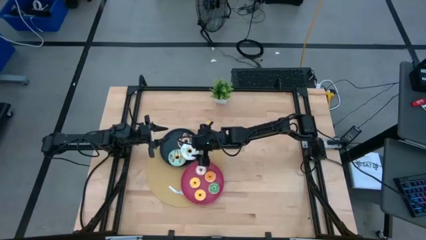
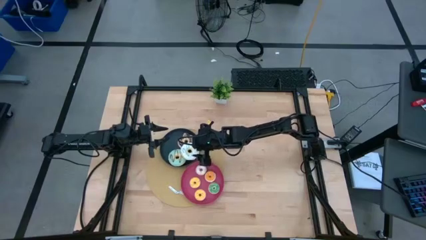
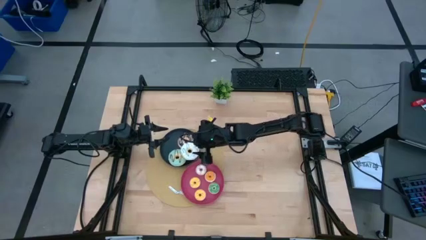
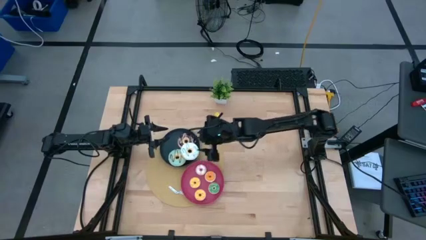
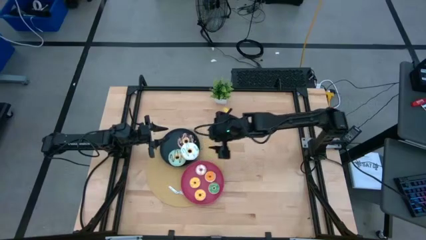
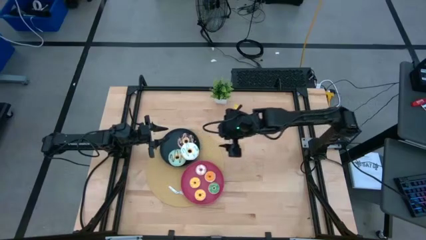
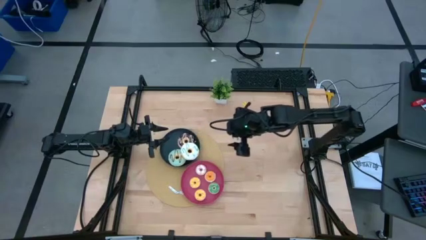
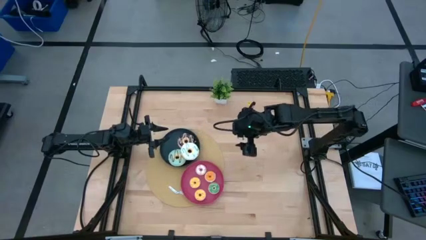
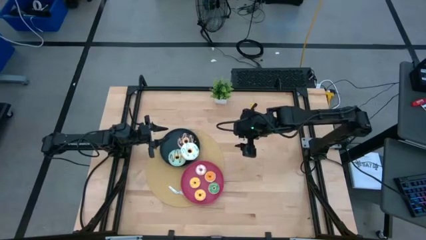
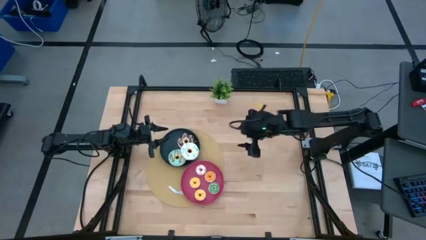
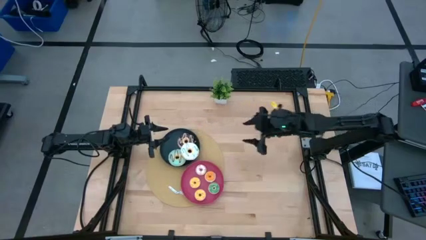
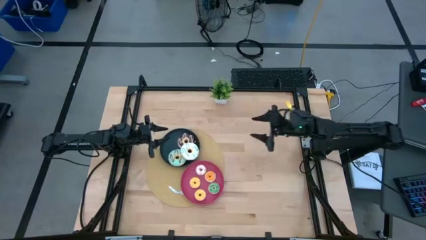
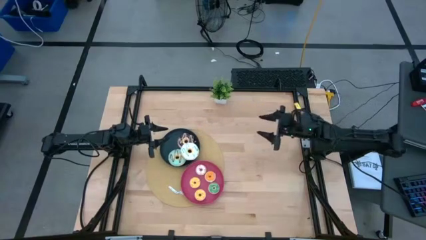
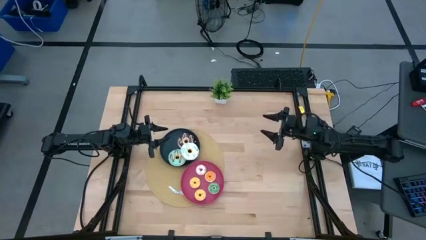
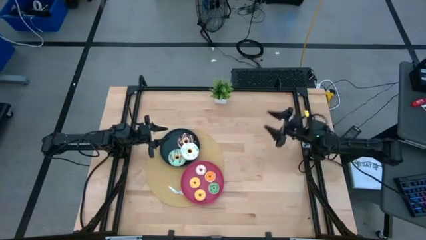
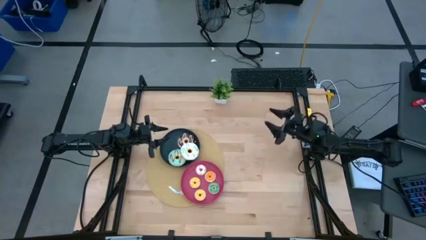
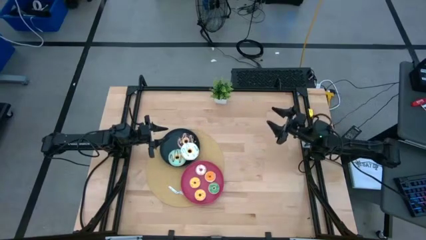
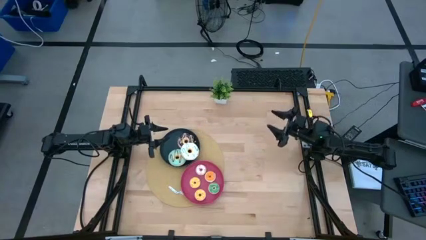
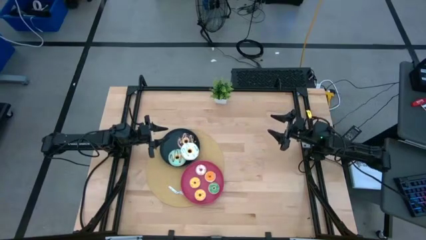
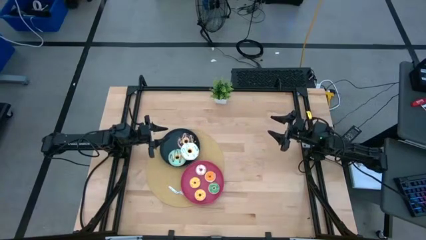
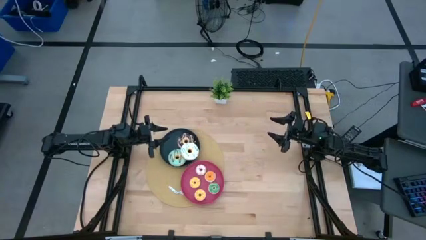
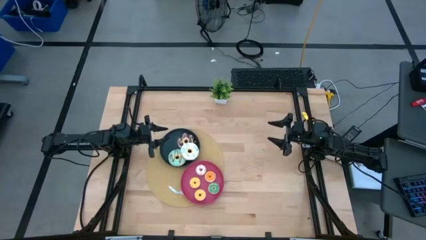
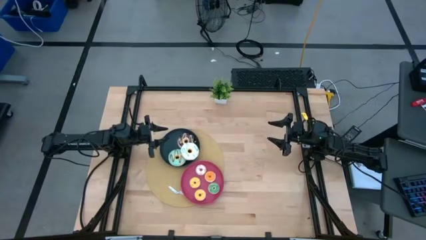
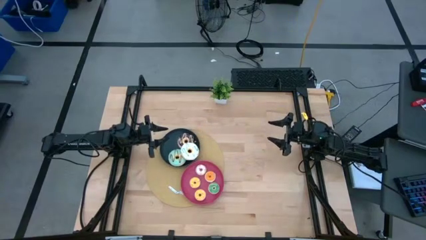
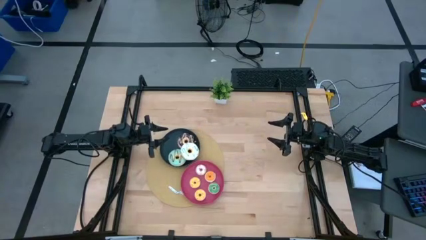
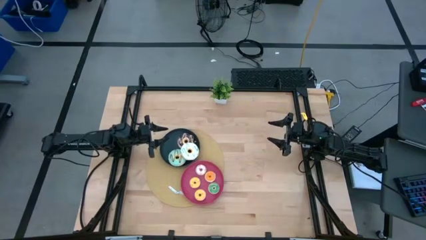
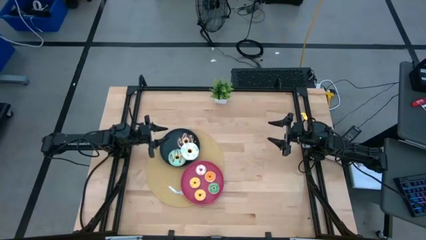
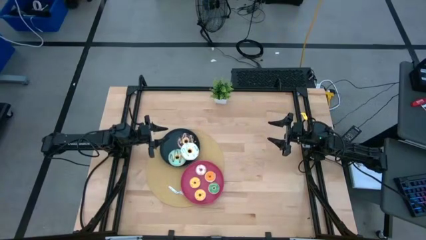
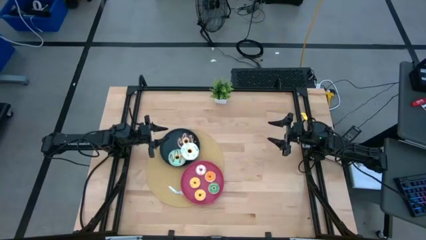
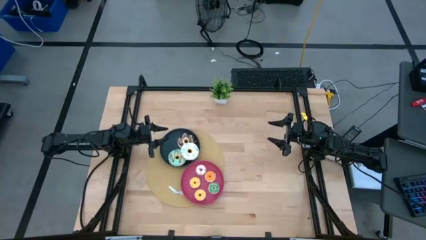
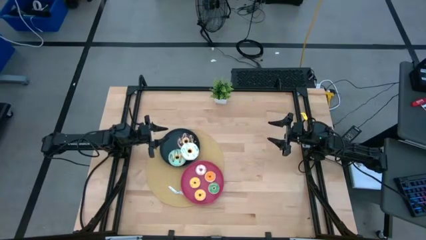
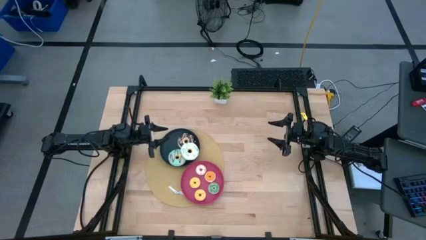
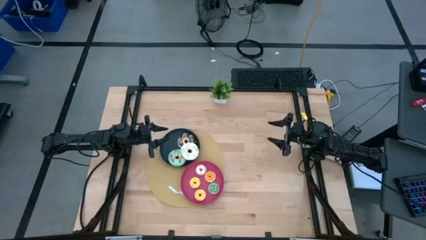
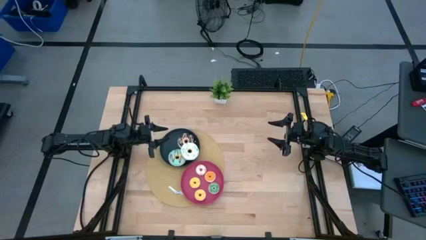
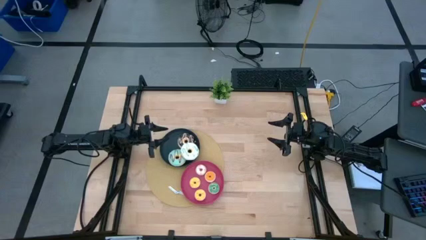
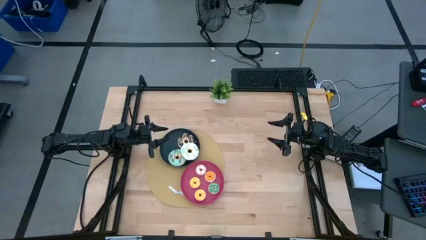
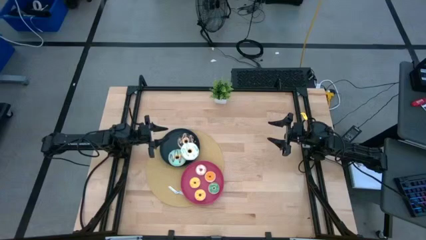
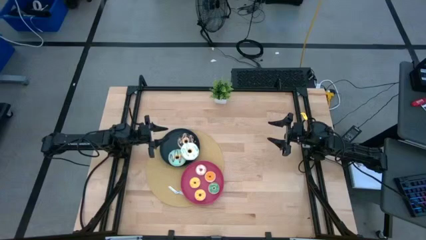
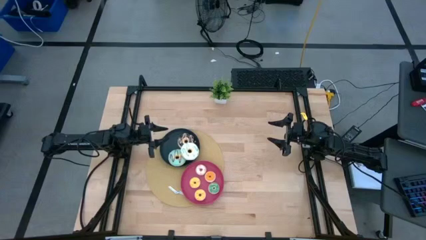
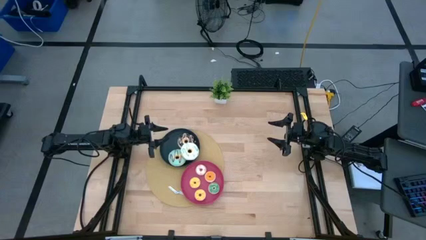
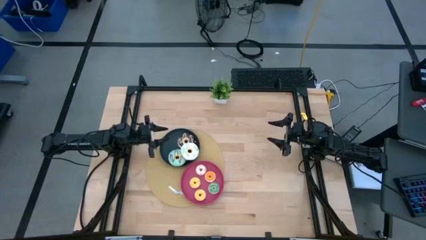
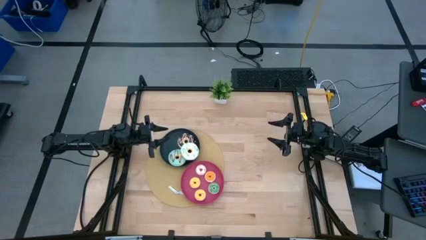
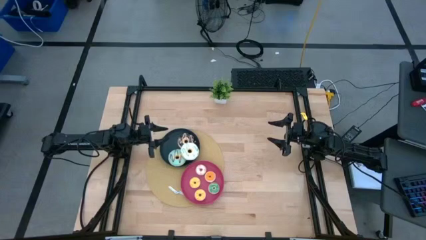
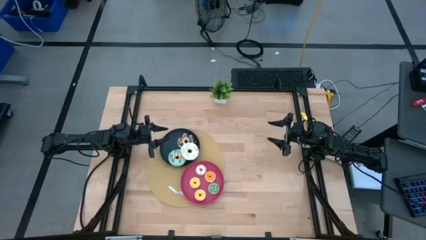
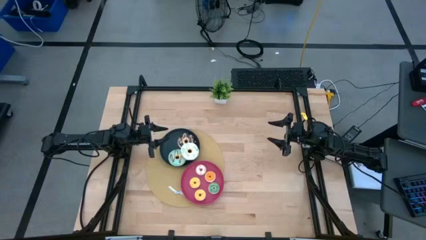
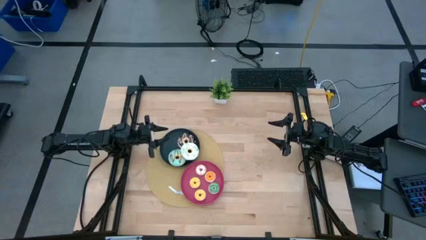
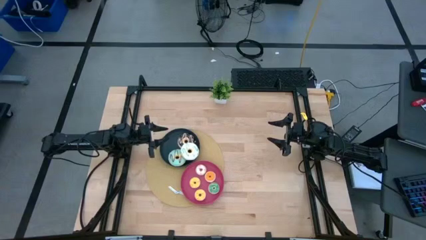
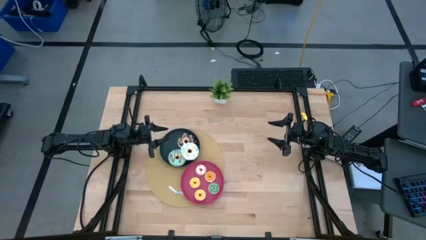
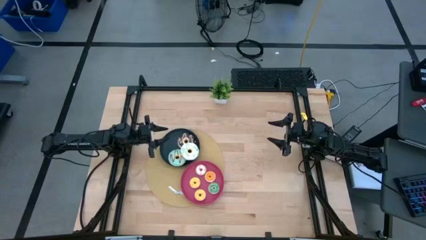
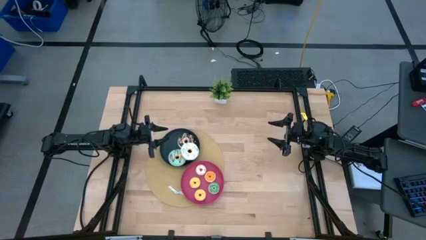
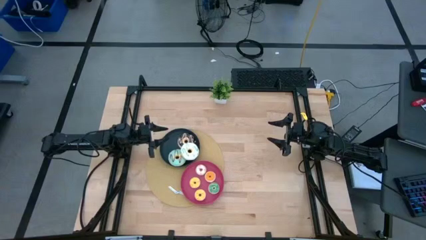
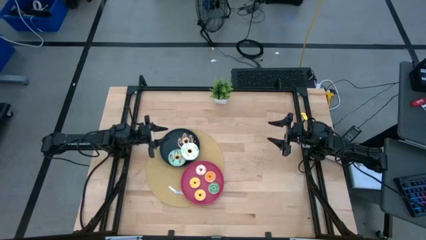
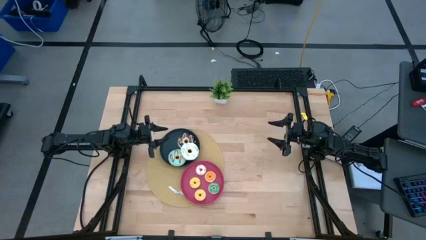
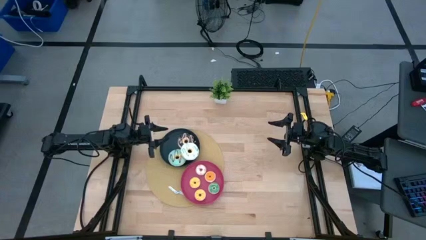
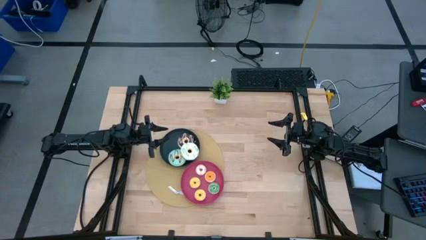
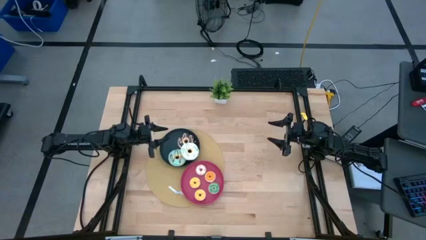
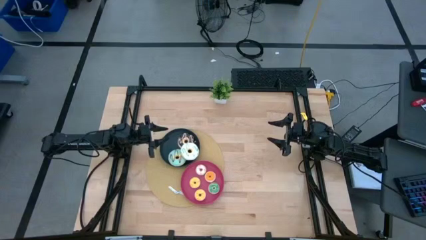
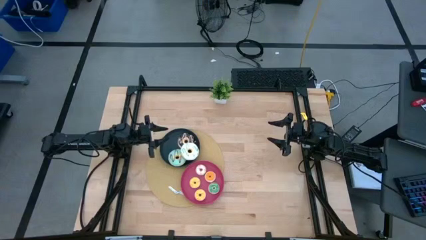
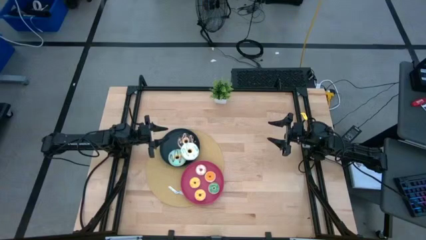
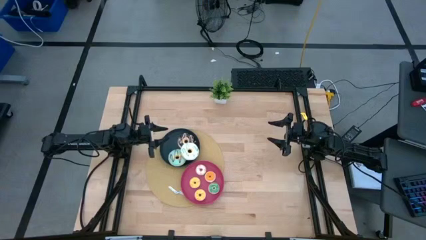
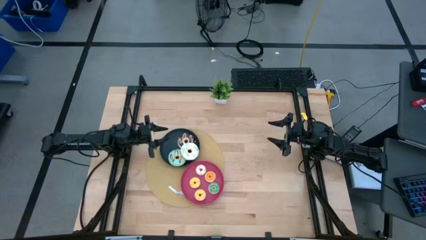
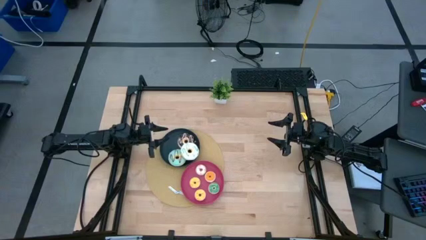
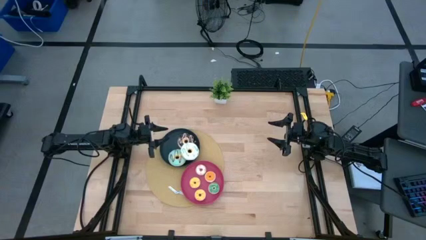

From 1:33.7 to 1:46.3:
Task: Pick & Place donuts
Return to Home Position
